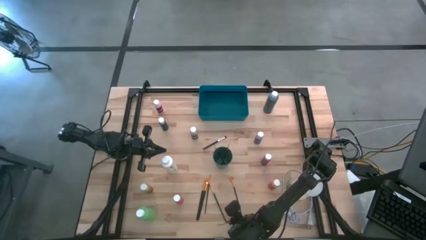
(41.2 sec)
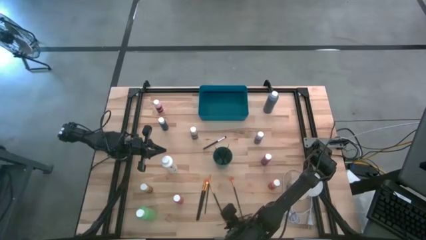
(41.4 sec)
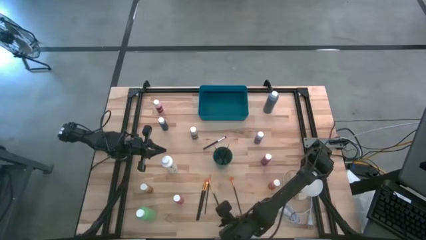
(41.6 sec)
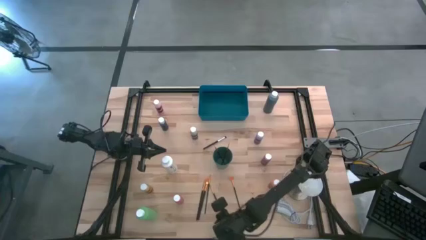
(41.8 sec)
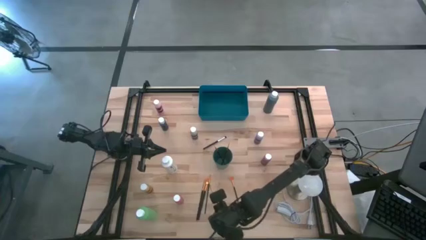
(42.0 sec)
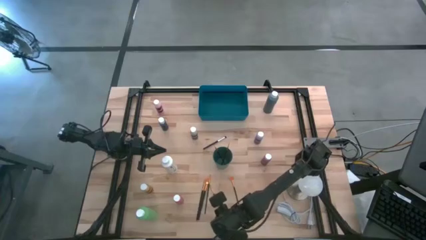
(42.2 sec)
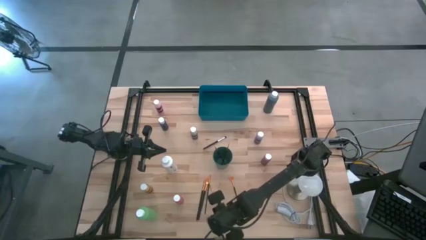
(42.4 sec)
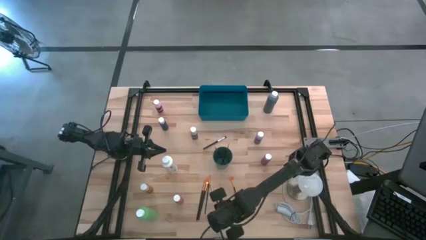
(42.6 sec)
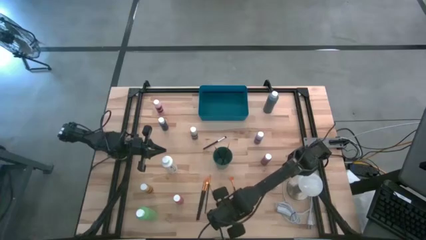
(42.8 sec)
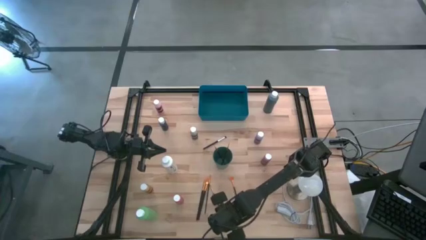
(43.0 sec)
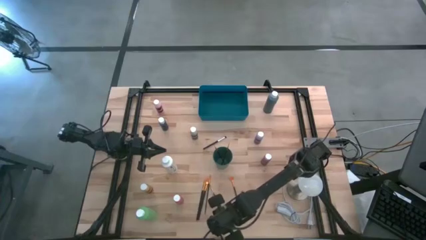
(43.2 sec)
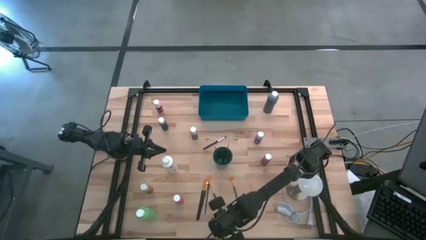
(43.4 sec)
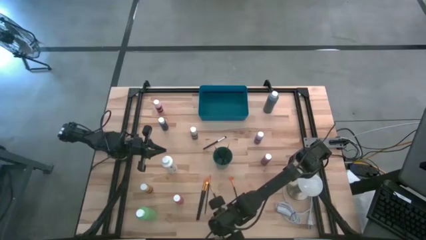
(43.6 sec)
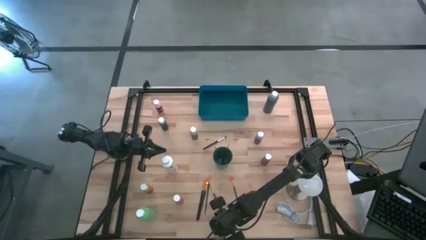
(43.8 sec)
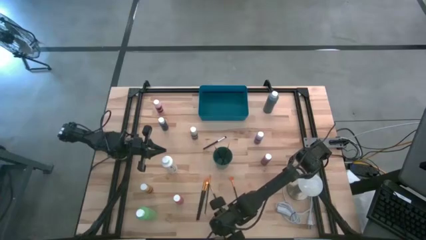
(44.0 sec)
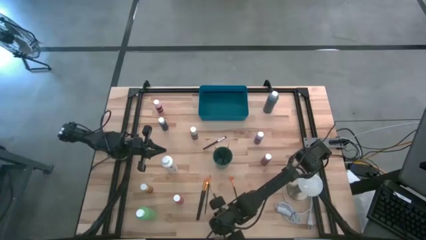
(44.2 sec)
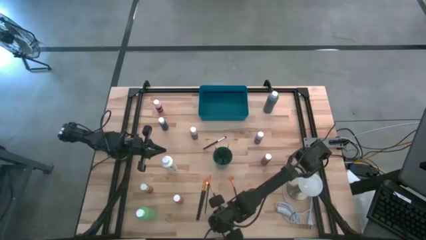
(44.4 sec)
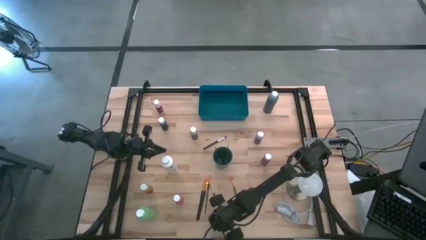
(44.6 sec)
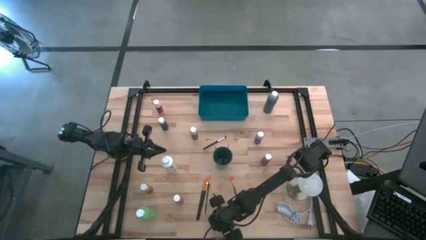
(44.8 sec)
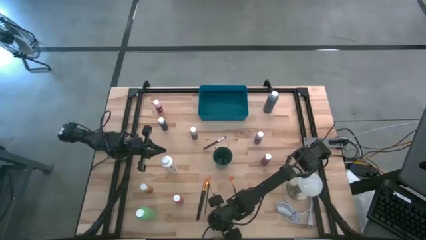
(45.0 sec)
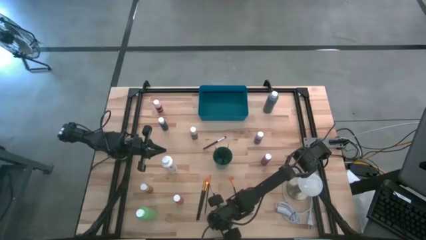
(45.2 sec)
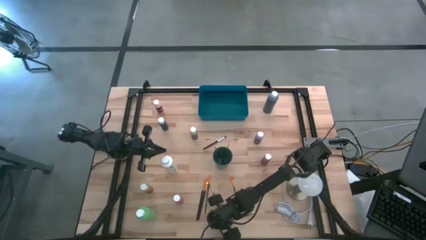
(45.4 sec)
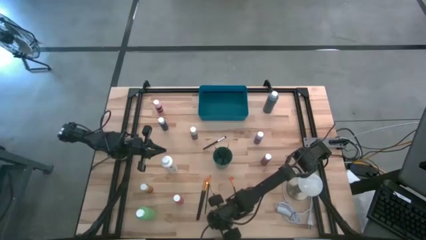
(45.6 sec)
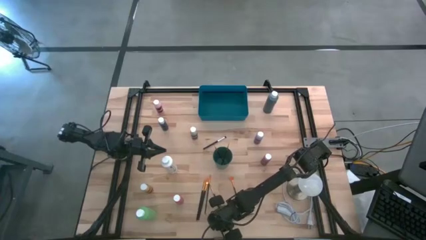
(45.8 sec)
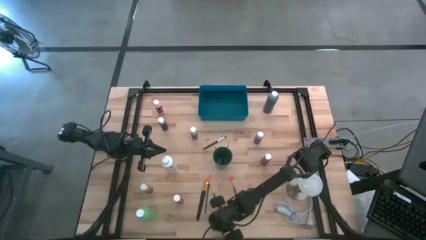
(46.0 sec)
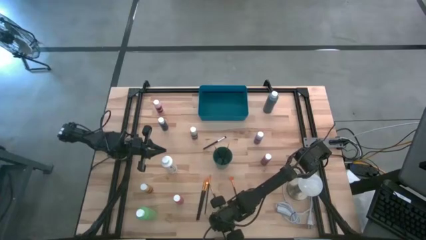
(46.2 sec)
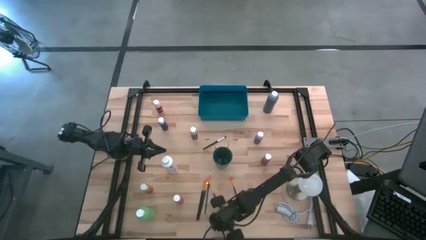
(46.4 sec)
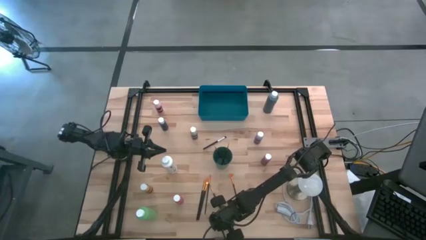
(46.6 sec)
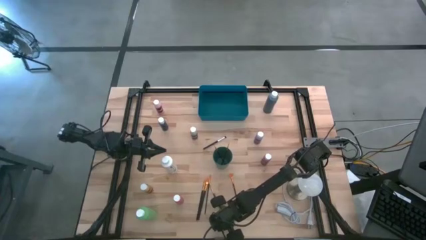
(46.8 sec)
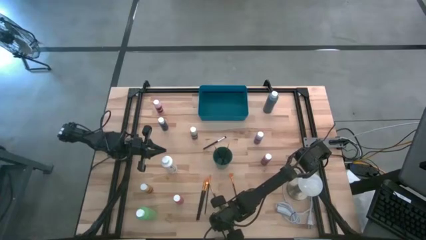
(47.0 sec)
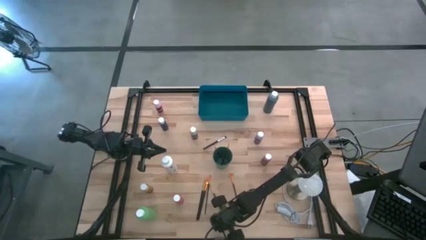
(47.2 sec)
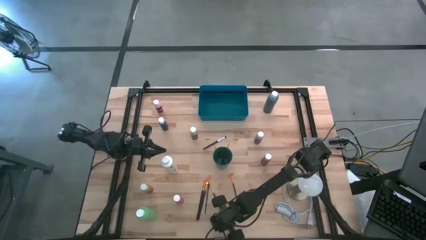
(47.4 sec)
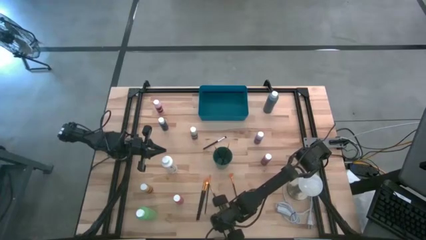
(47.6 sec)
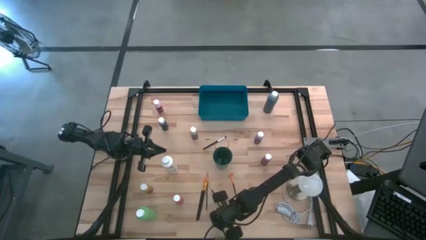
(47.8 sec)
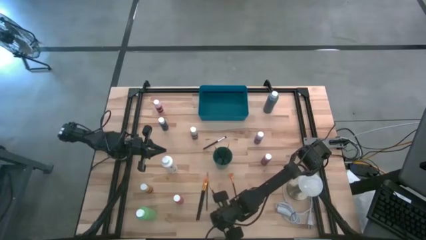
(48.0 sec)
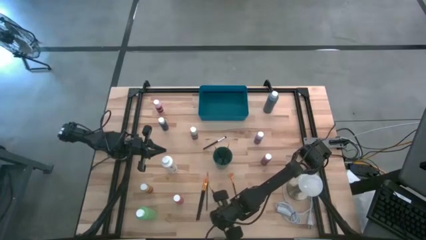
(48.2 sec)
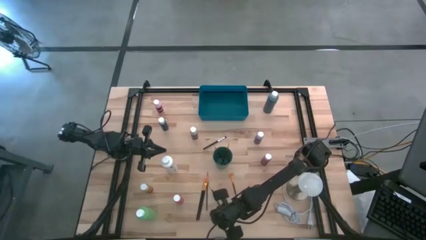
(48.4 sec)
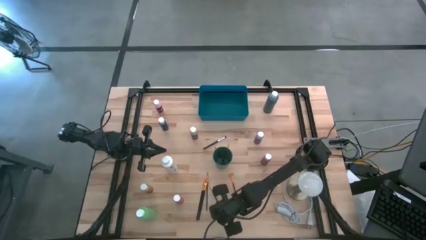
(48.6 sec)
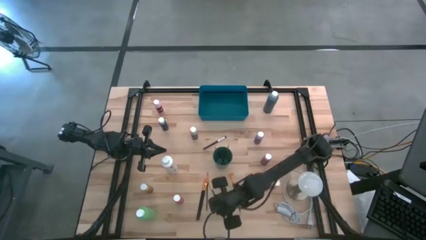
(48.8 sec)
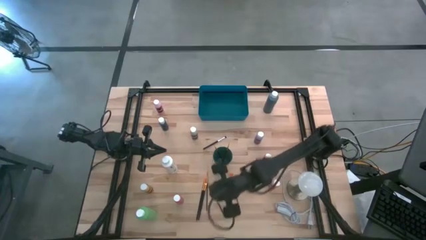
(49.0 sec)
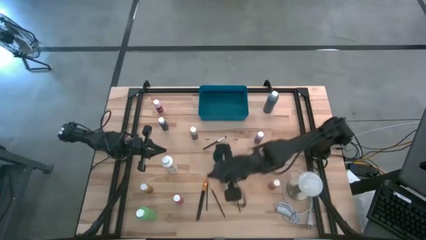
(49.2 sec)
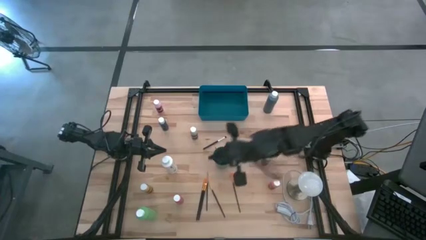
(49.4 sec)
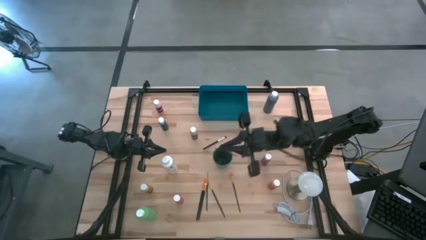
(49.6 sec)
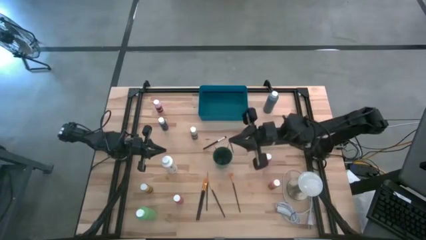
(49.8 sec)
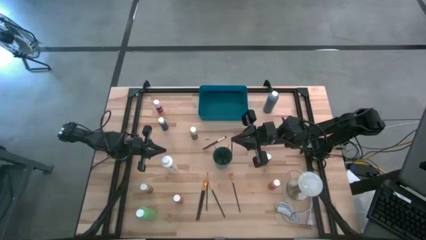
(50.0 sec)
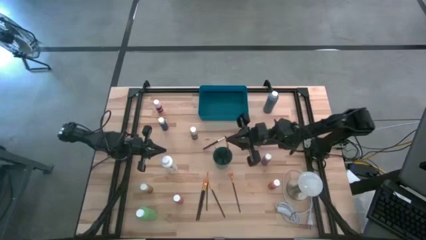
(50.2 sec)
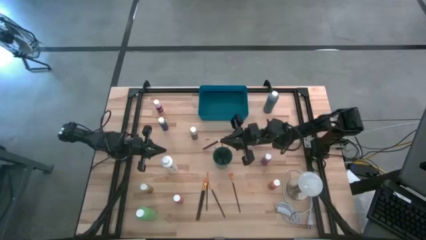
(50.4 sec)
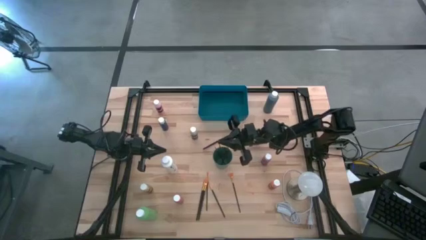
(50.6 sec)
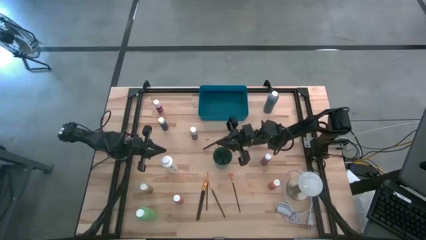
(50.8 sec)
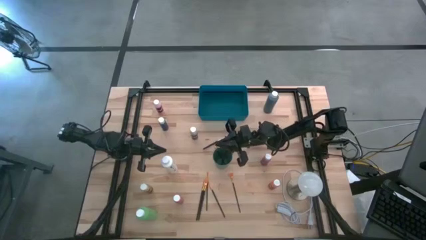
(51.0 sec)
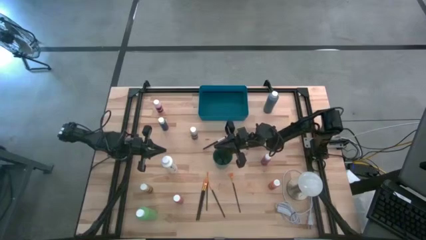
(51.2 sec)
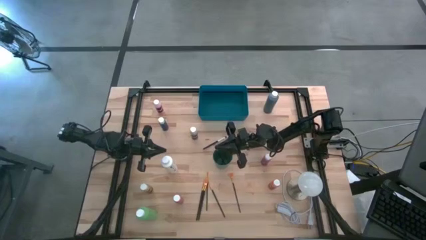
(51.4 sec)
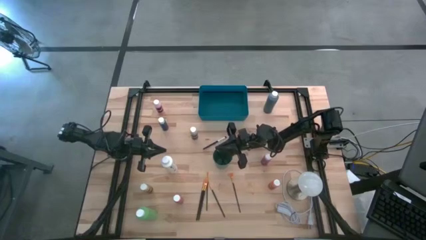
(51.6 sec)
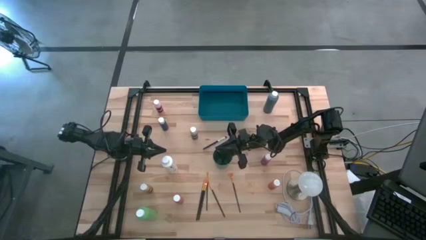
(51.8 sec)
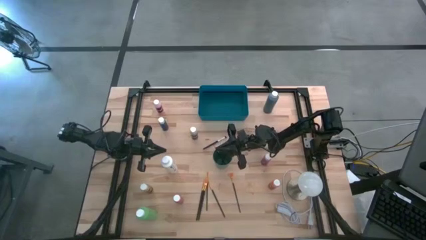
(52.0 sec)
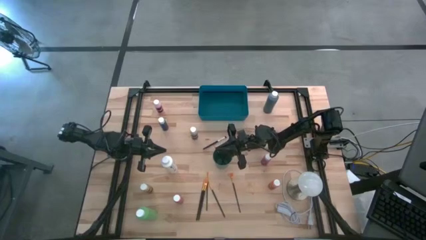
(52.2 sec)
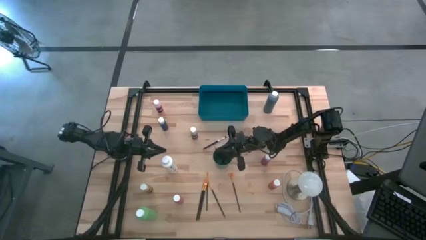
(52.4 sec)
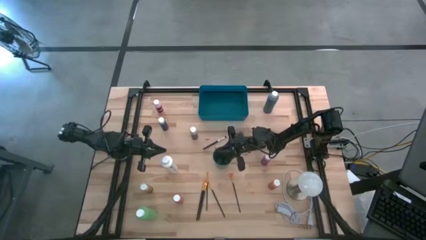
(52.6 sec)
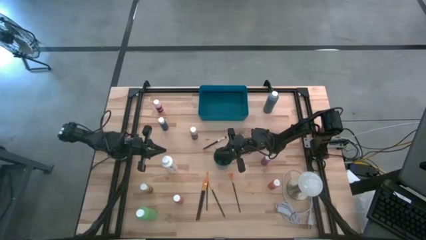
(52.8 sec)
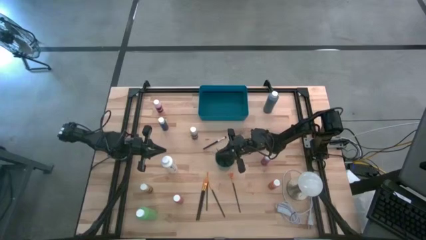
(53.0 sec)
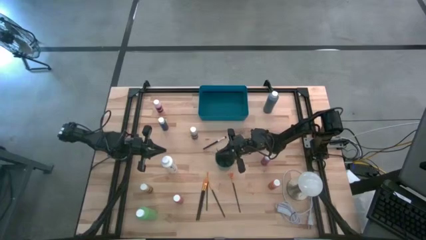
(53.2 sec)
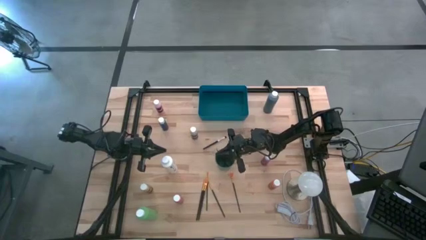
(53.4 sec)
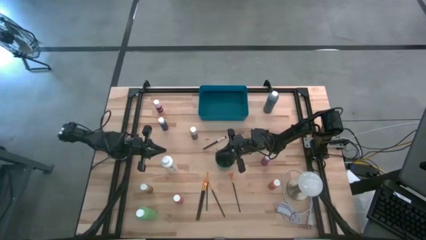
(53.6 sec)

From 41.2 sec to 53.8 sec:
Task: Pick & Place Paint Supplies
Put the yellow paint brush into the green cup
